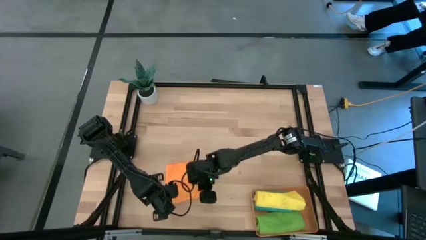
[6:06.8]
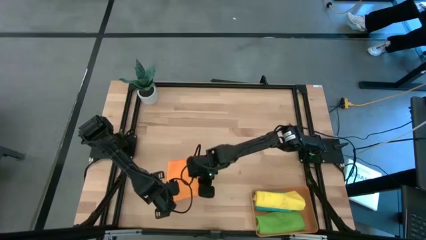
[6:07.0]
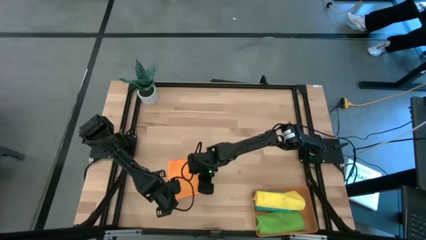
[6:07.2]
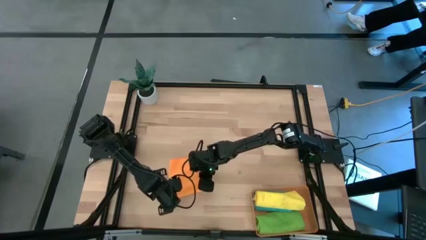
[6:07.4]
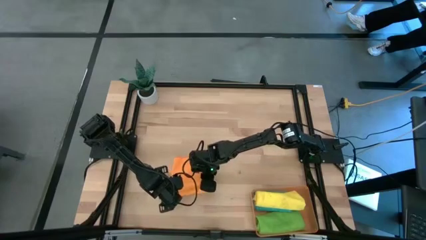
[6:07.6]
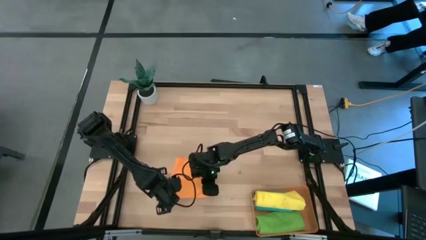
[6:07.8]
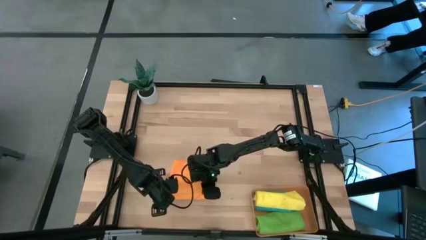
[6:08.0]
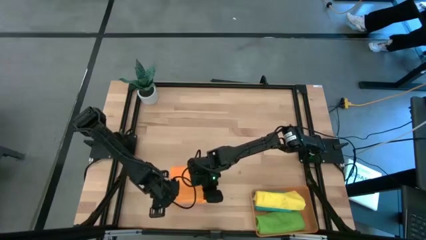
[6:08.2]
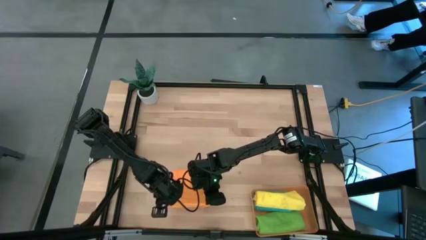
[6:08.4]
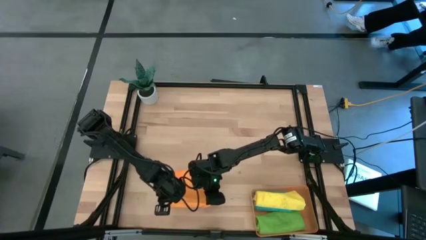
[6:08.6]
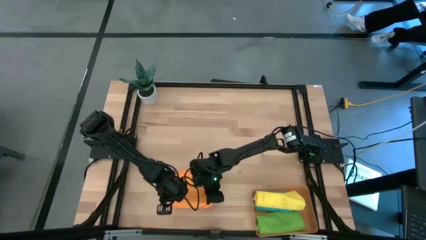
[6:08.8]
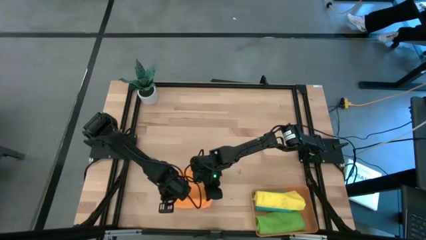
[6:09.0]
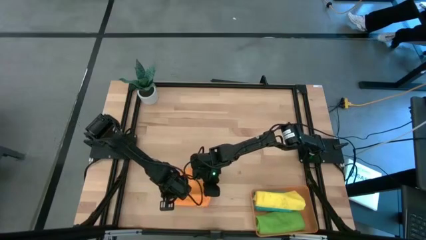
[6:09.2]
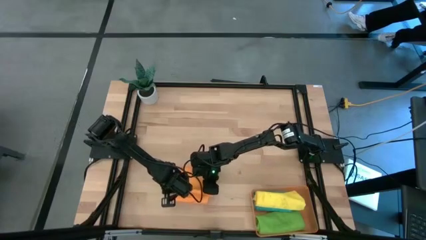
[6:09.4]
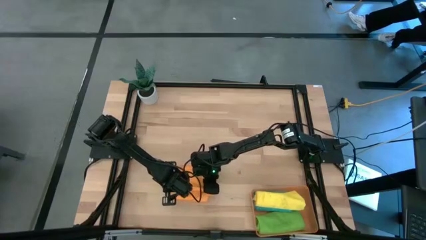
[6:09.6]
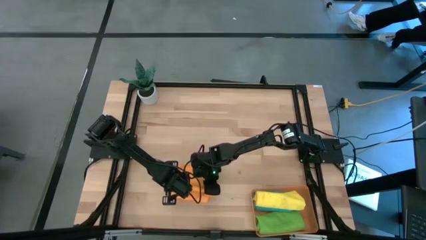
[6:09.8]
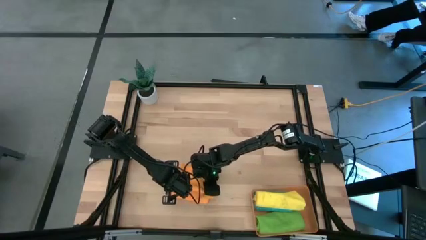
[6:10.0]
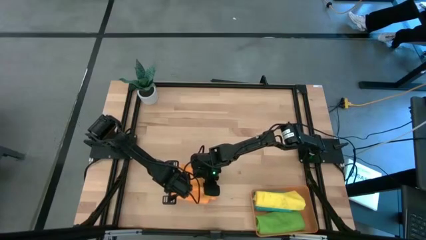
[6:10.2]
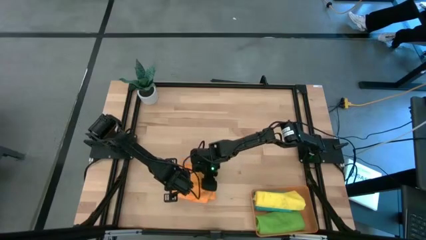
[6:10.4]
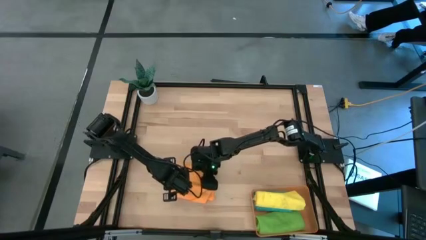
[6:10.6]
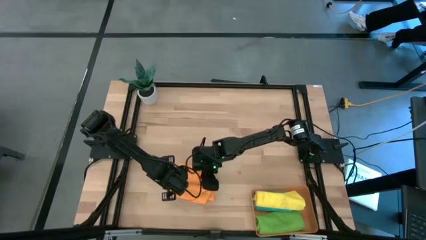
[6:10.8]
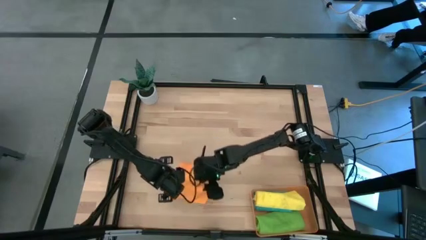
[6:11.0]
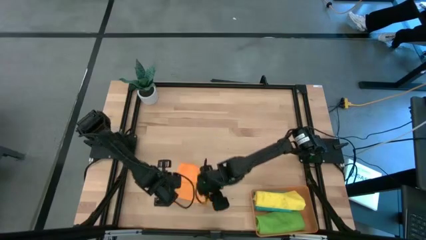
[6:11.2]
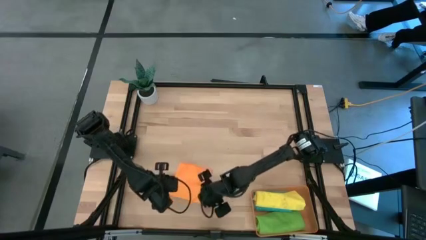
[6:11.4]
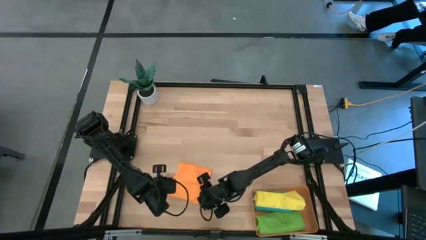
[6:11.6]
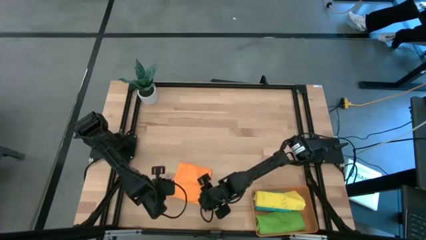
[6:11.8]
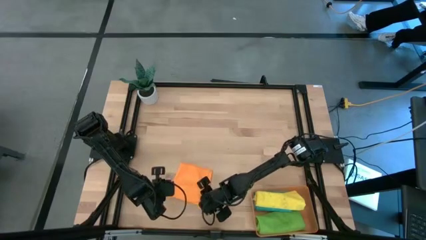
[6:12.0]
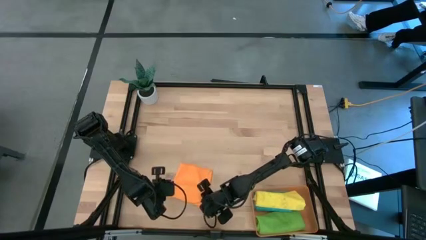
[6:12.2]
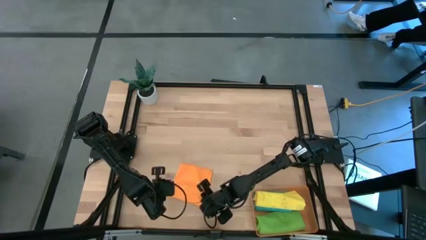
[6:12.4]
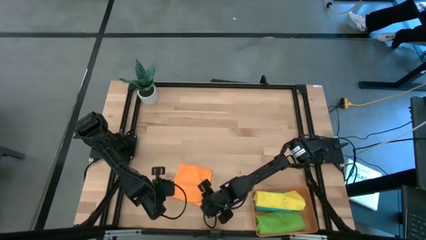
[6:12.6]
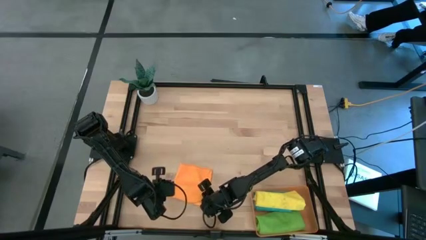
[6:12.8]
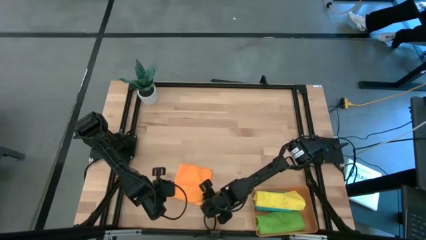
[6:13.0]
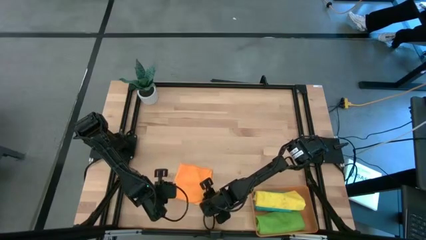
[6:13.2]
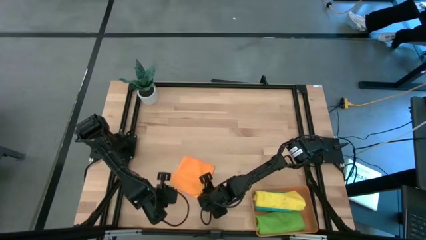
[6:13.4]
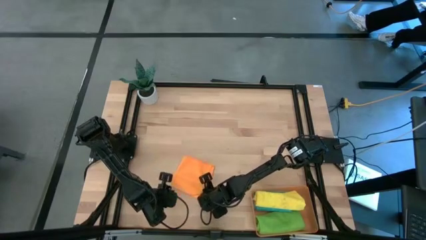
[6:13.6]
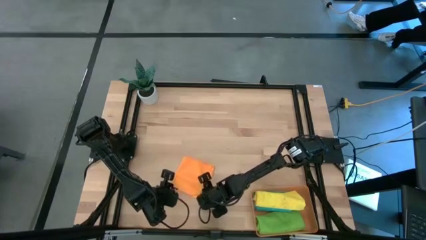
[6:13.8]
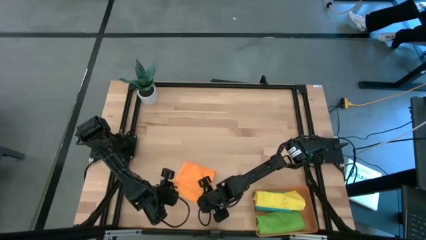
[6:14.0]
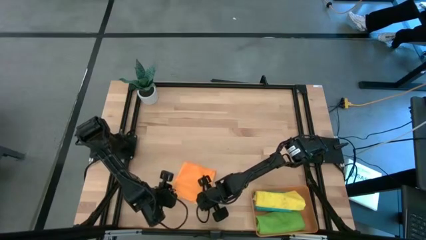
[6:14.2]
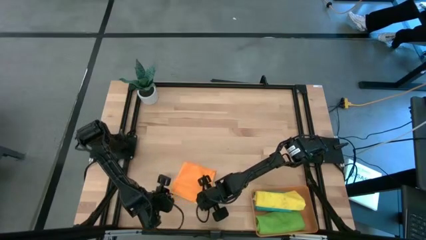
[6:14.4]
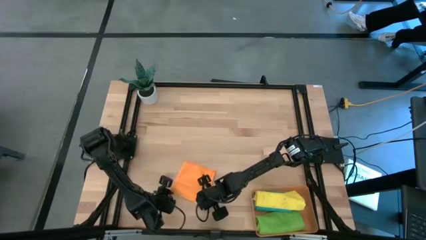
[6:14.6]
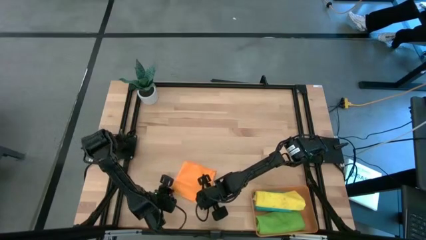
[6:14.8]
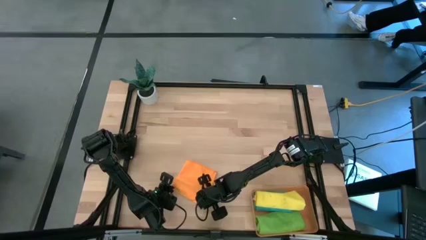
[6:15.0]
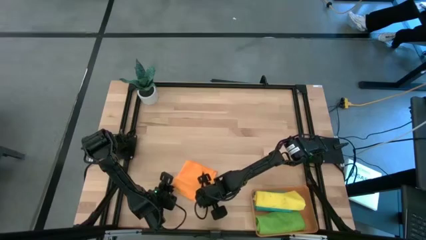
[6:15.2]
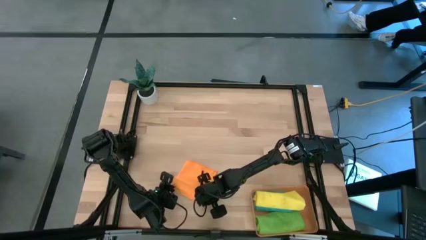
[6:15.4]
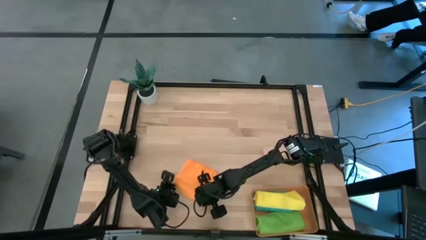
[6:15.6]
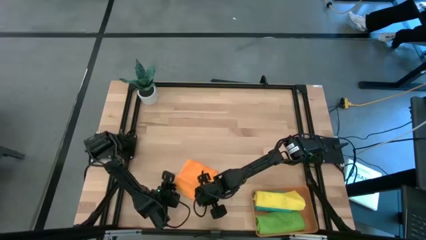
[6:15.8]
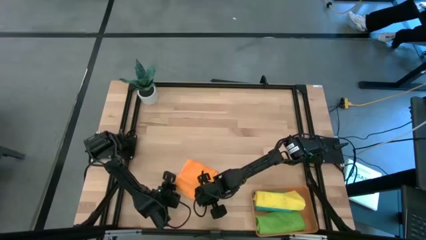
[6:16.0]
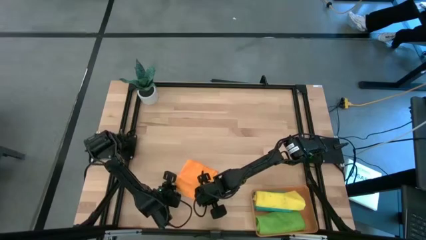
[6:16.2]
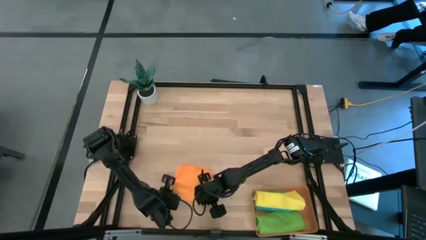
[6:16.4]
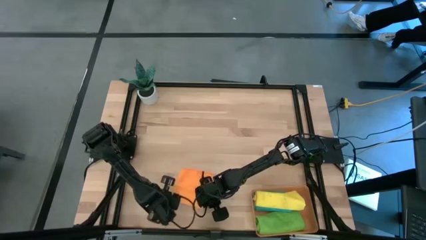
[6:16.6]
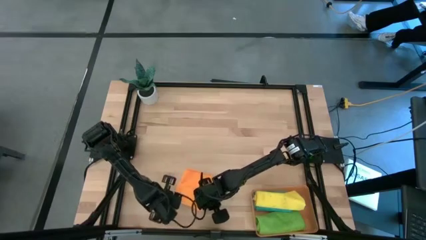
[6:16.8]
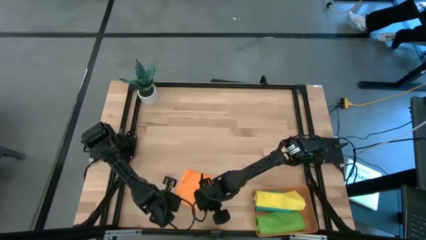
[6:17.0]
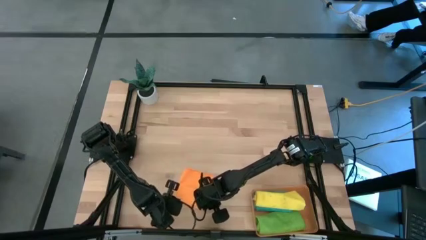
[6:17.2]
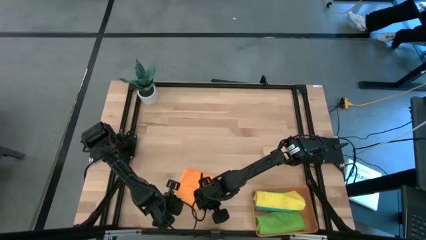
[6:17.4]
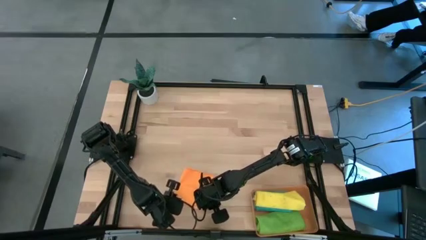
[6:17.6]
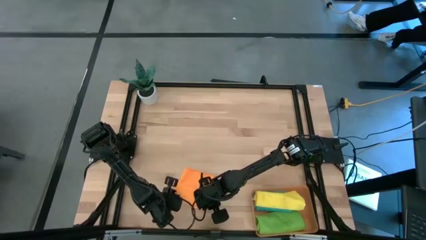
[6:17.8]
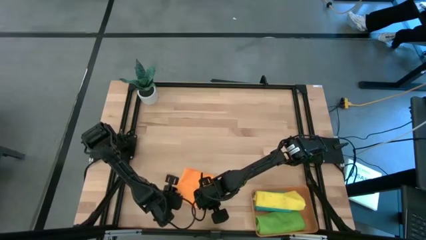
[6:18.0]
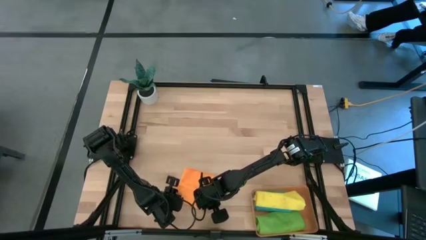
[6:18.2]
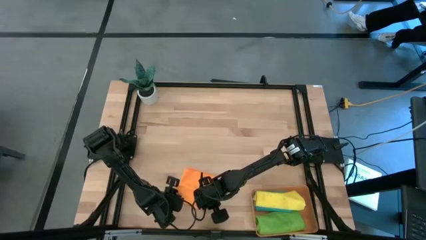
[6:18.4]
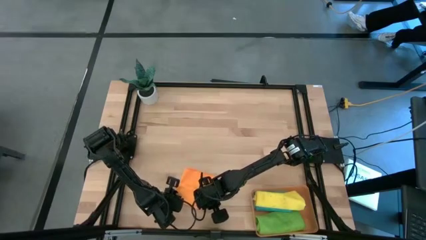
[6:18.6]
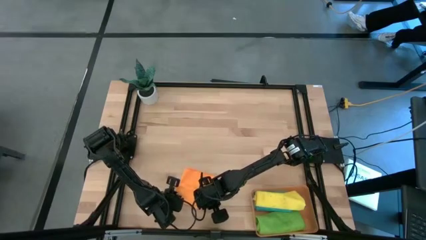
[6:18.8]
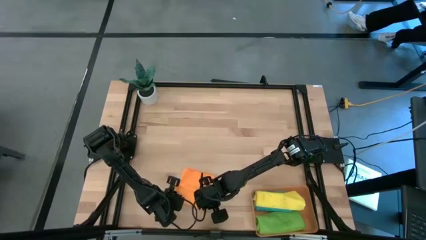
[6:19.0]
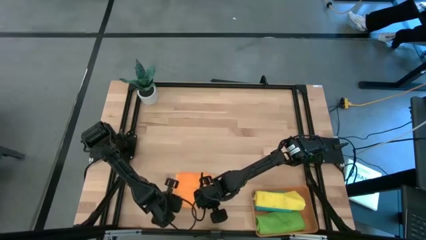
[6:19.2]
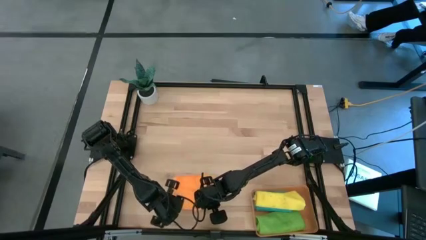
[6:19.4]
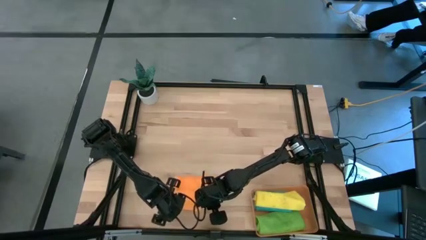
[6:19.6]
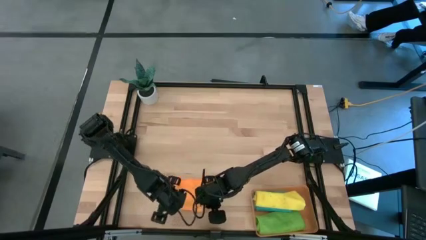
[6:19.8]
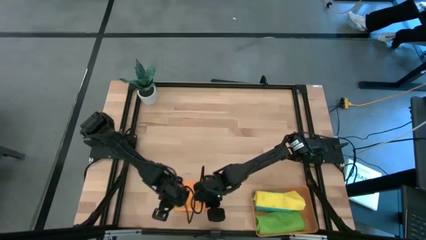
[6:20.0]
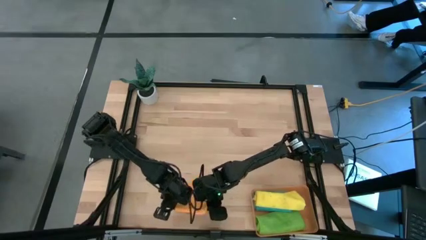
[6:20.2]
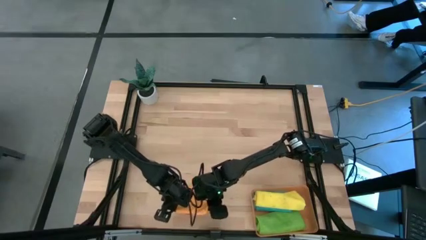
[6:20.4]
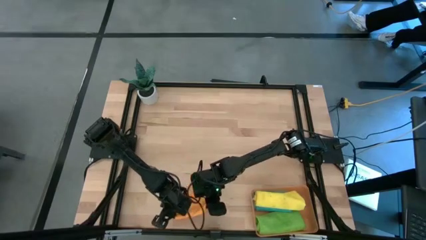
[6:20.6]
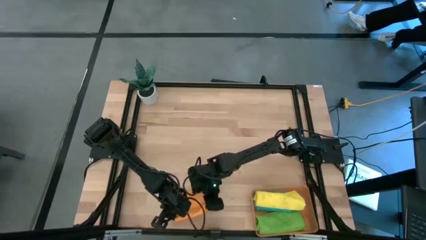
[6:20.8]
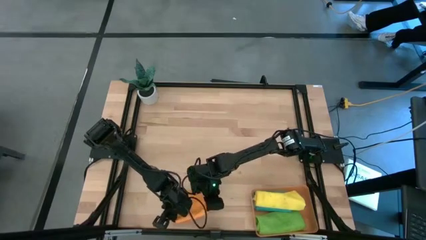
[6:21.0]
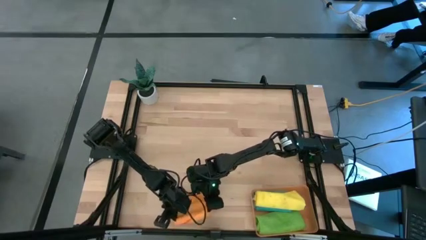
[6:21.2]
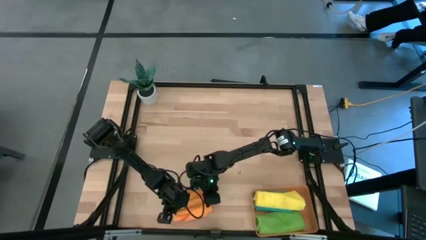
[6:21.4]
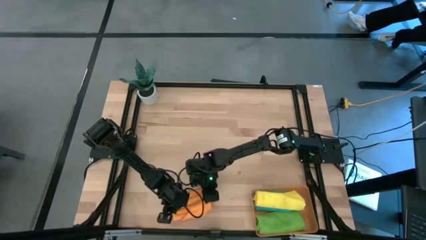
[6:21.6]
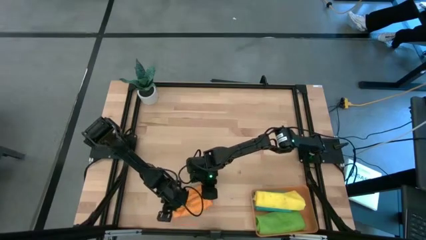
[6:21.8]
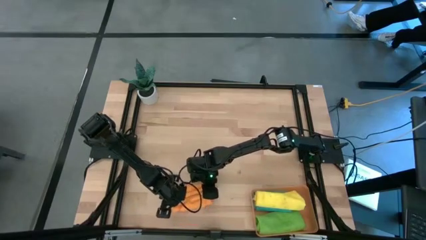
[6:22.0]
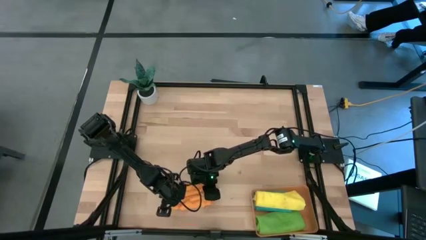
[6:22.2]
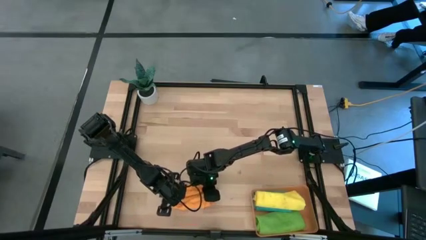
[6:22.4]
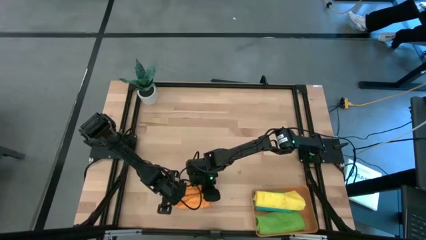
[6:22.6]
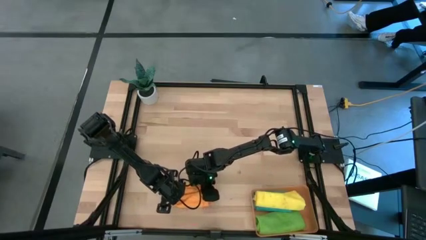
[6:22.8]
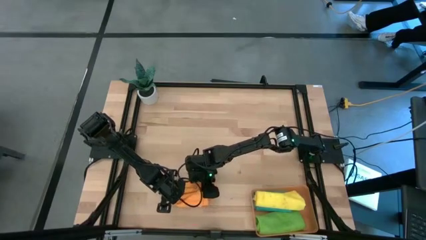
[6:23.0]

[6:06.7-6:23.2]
Task: Roll microfiber towels into tight, uniform cylinder then place into a basket
Roll the orange microfiber towel
